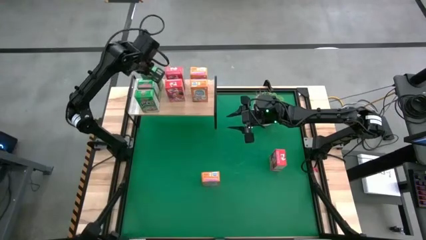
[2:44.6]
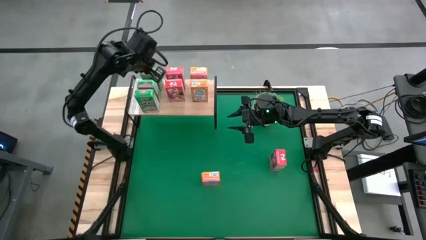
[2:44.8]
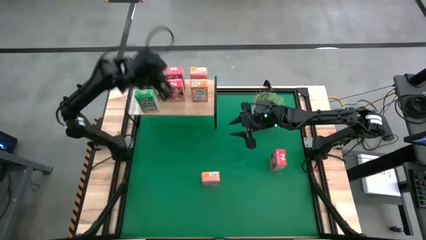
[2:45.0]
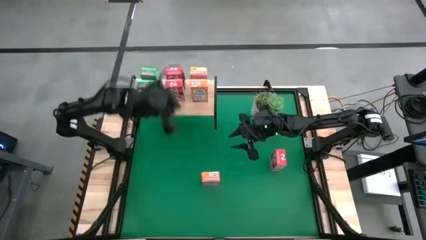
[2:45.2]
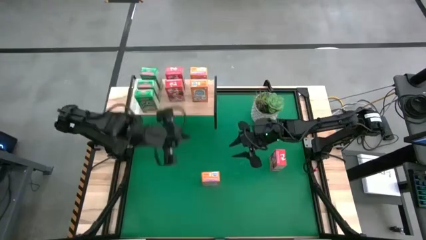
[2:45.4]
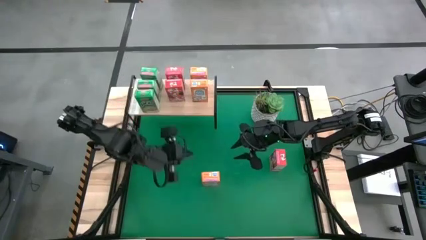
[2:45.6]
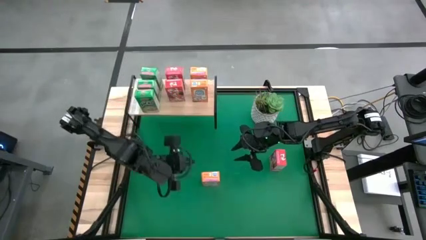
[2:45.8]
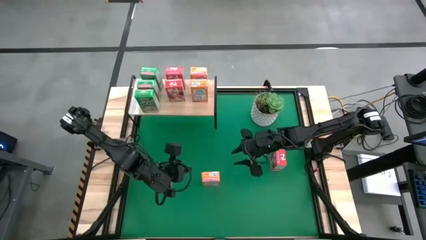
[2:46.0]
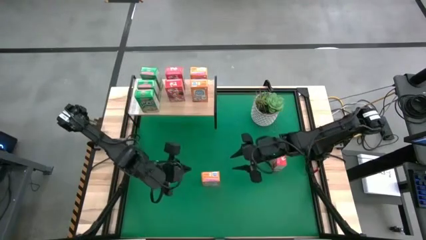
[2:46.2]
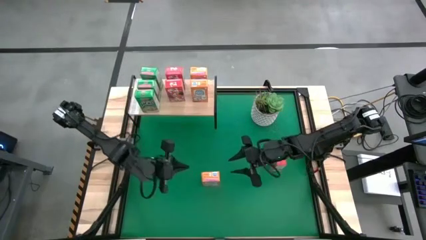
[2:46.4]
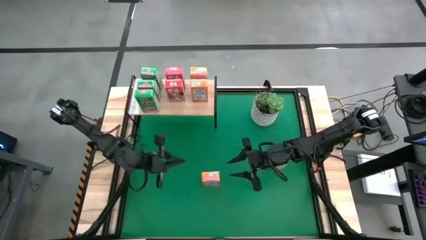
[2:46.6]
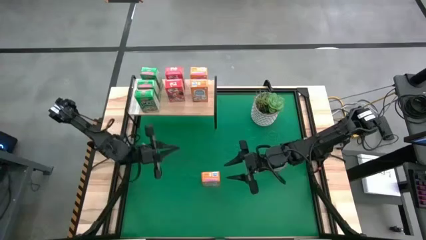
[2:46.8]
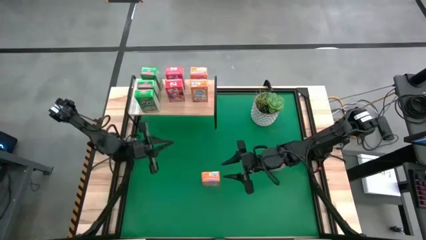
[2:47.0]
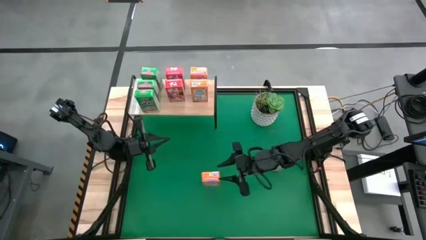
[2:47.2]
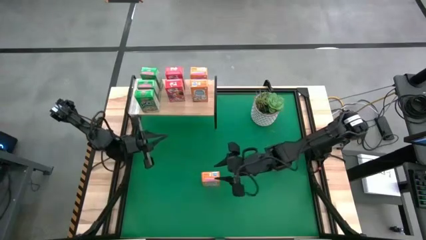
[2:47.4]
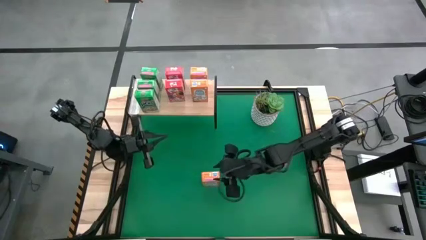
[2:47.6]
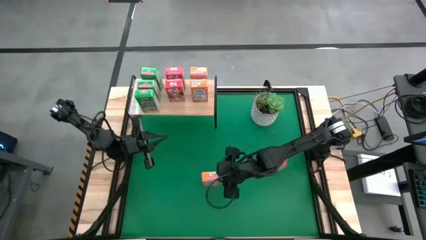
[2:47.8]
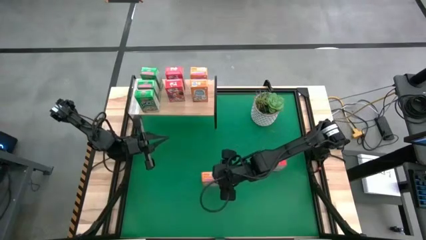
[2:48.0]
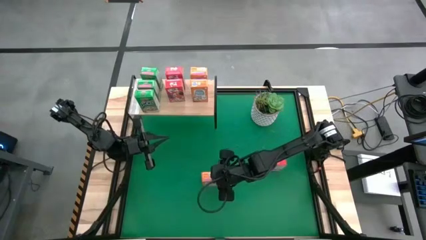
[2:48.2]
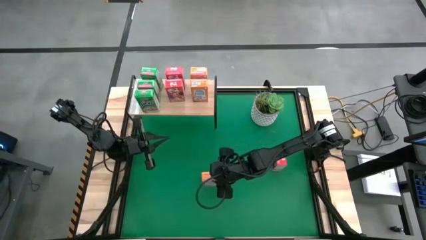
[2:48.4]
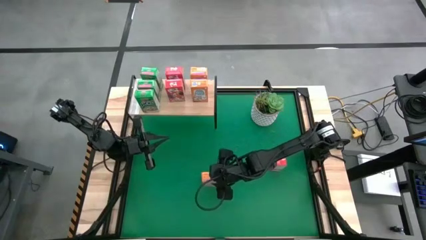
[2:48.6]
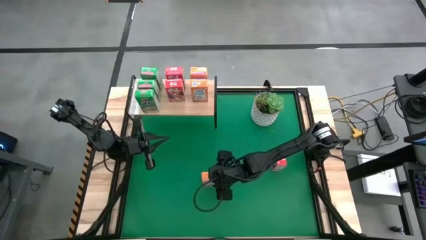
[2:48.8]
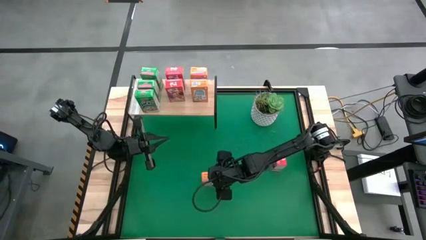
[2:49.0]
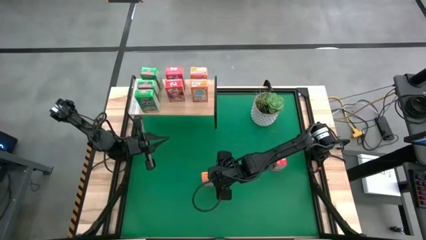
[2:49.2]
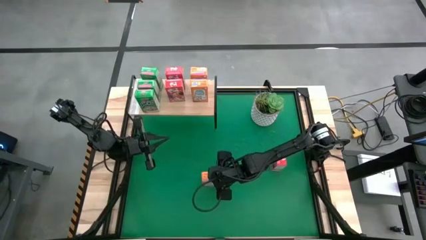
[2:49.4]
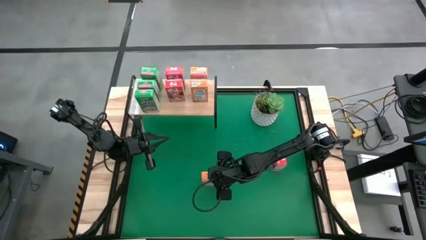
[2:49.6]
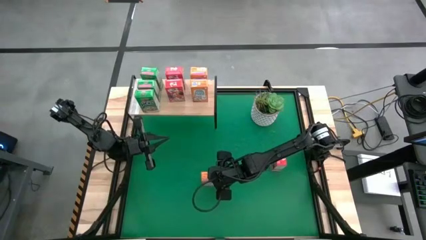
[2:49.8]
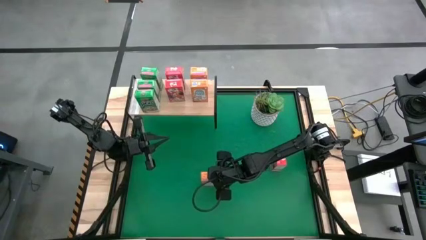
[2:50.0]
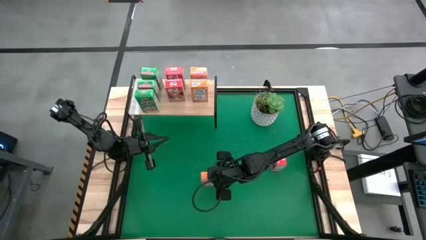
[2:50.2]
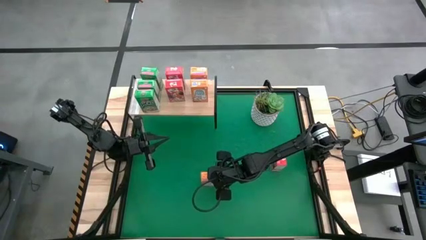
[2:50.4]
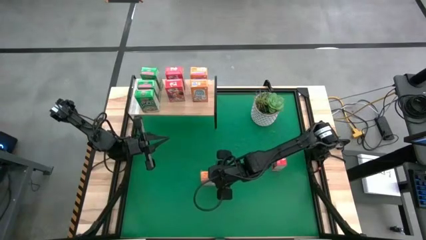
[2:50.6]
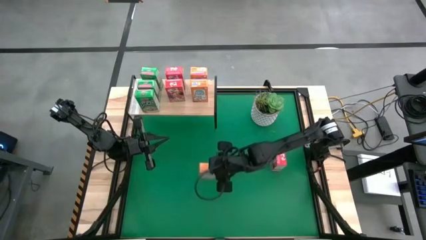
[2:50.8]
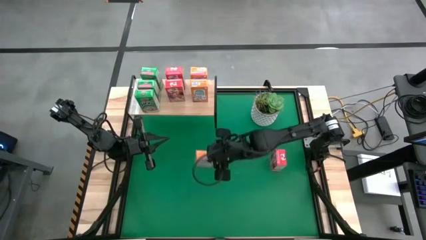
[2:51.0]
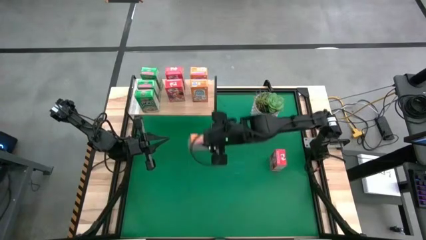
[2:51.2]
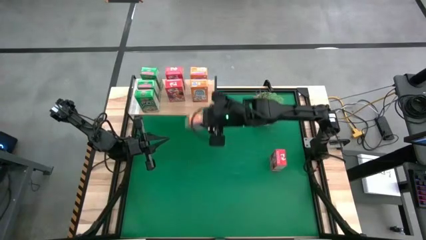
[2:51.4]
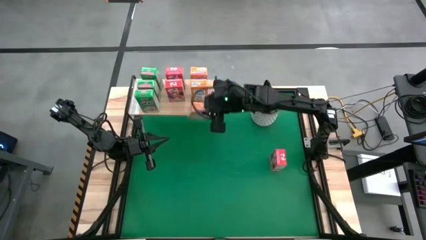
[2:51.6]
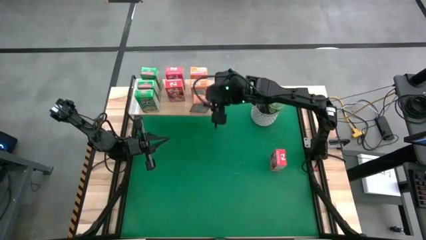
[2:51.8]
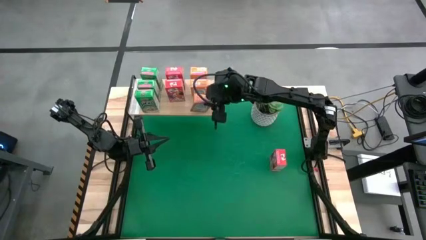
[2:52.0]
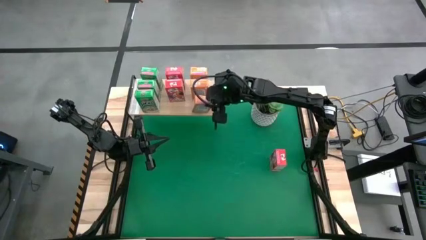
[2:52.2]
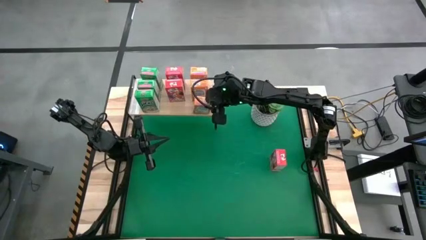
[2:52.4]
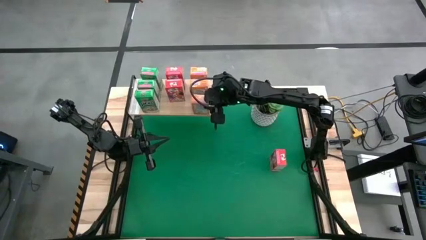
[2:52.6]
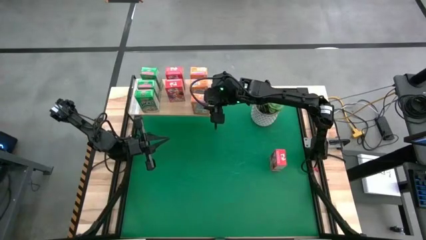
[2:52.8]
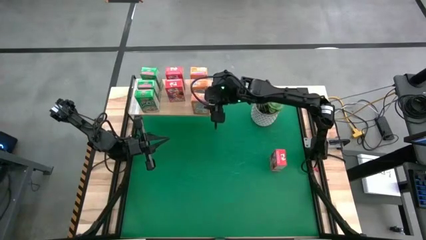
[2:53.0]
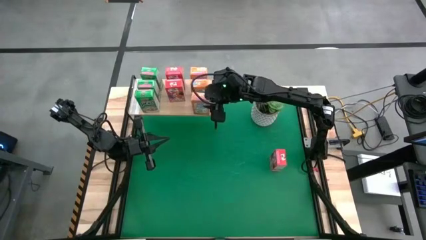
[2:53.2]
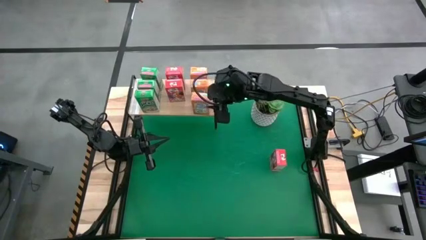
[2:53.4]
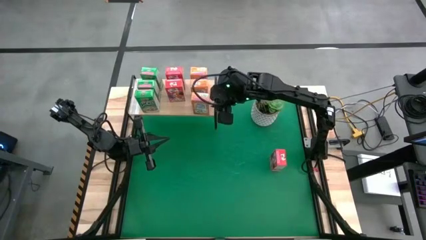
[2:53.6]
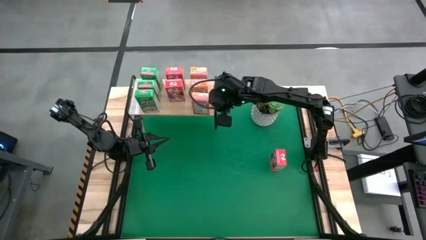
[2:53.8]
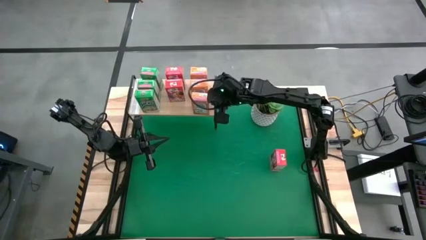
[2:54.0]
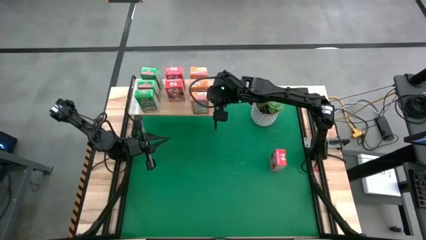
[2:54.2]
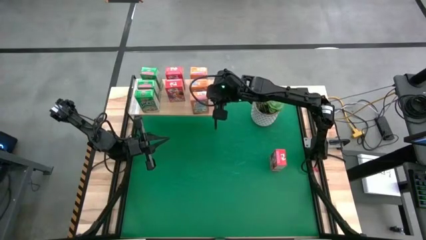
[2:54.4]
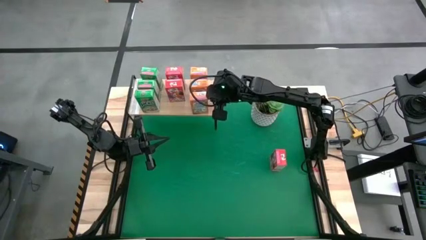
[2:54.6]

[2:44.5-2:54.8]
Task: Stack cereal on shelf
Put the orange cereal box on the shelf aligned with other orange cereal boxes

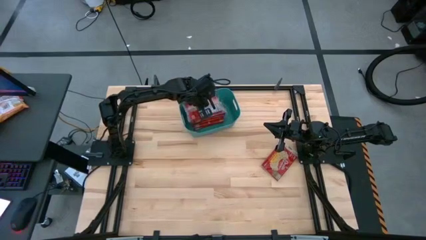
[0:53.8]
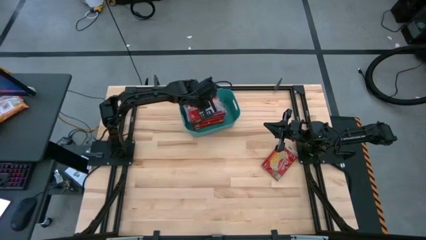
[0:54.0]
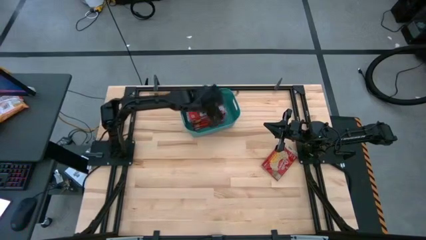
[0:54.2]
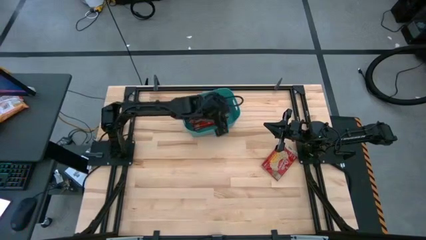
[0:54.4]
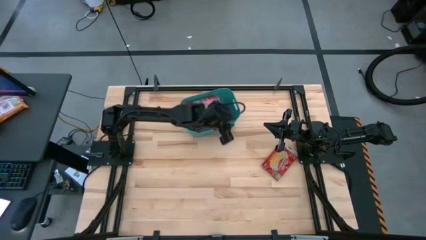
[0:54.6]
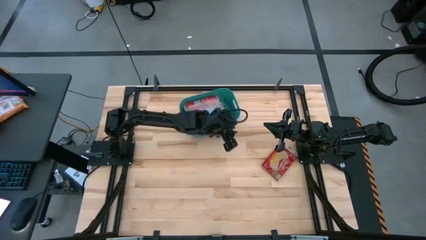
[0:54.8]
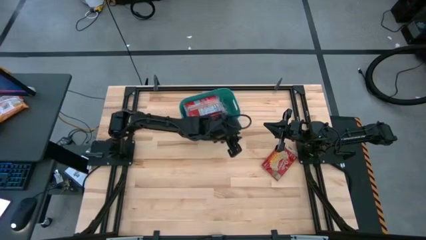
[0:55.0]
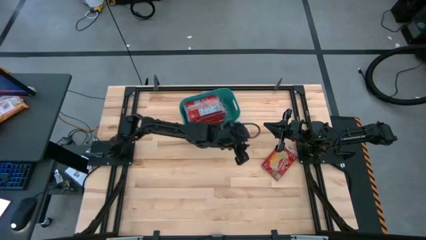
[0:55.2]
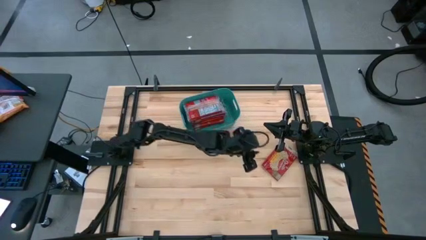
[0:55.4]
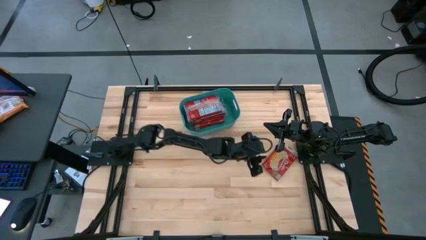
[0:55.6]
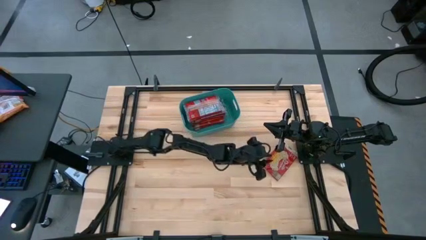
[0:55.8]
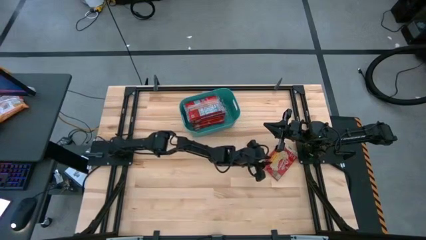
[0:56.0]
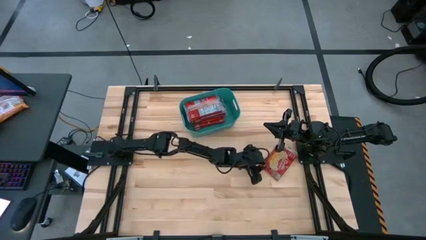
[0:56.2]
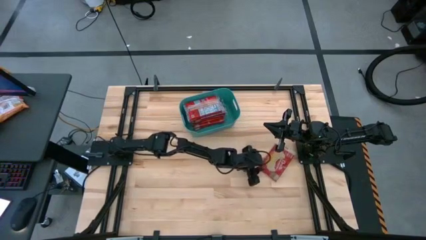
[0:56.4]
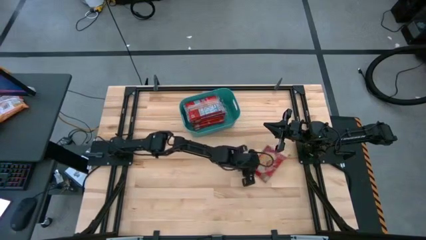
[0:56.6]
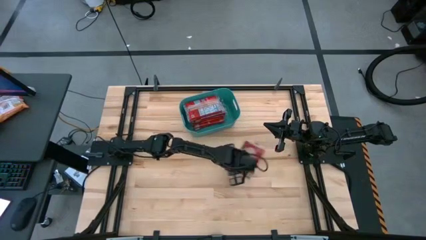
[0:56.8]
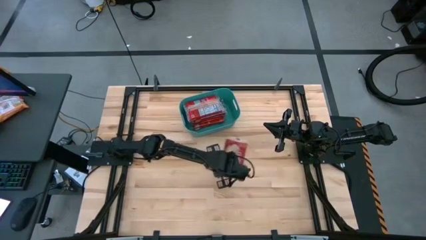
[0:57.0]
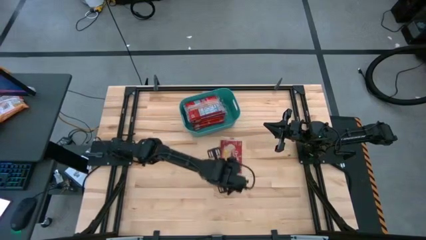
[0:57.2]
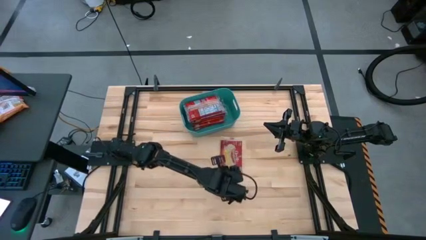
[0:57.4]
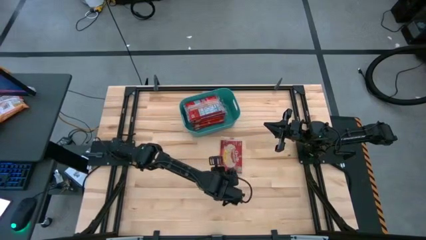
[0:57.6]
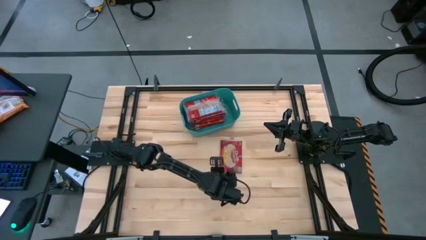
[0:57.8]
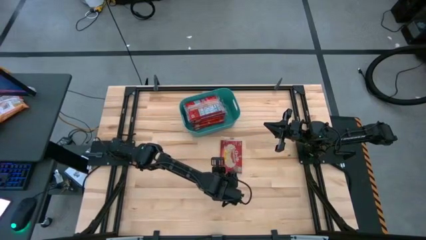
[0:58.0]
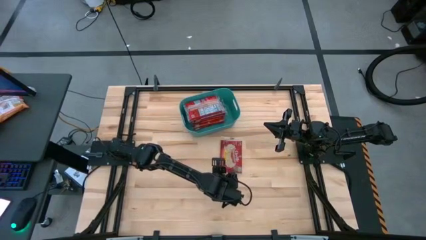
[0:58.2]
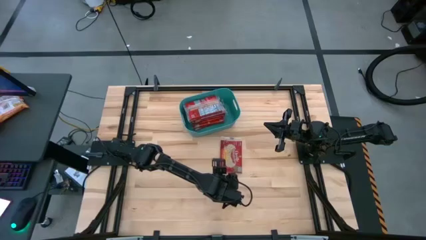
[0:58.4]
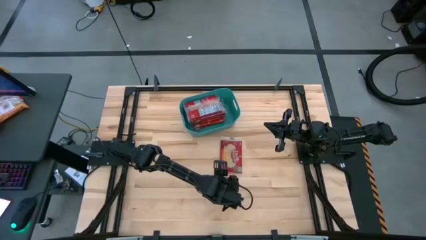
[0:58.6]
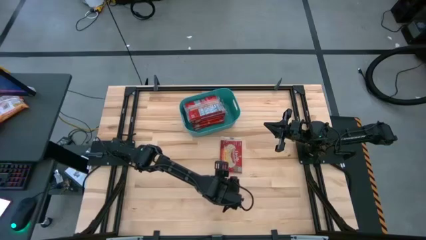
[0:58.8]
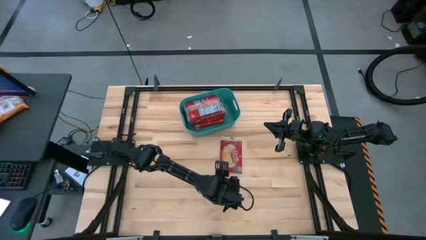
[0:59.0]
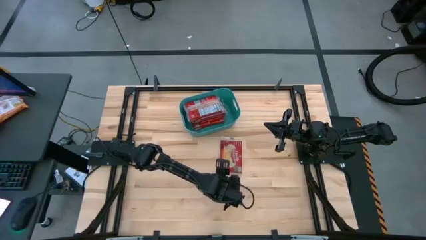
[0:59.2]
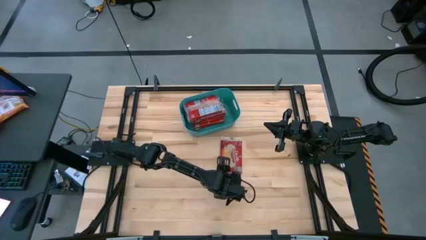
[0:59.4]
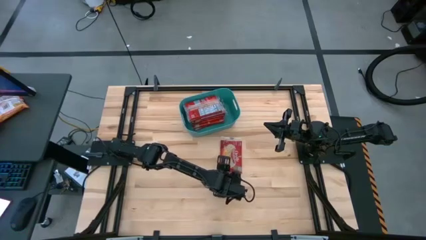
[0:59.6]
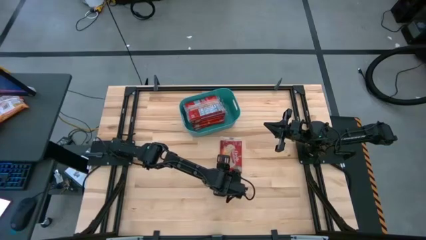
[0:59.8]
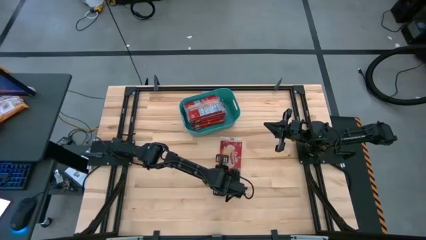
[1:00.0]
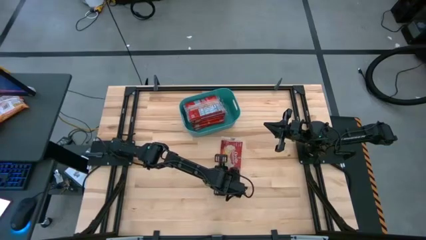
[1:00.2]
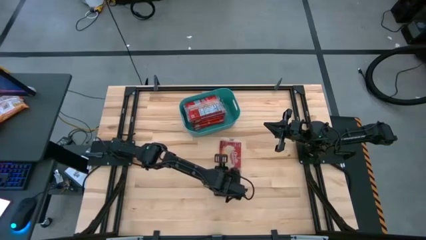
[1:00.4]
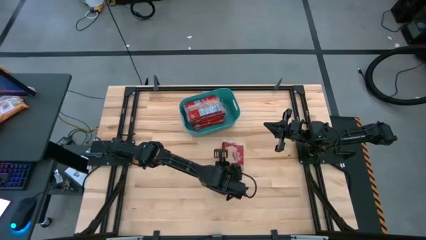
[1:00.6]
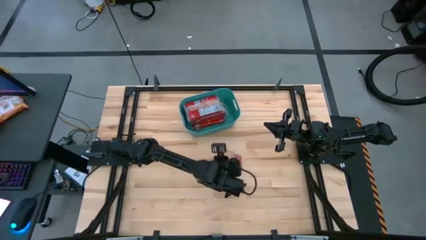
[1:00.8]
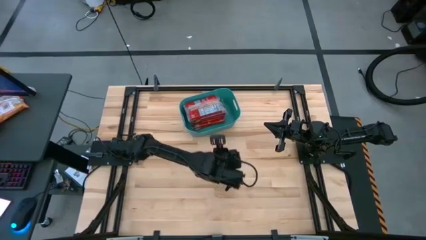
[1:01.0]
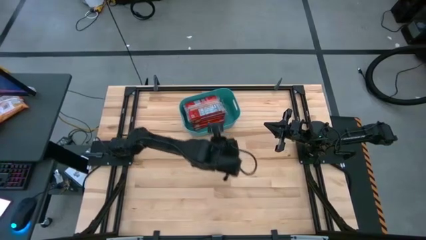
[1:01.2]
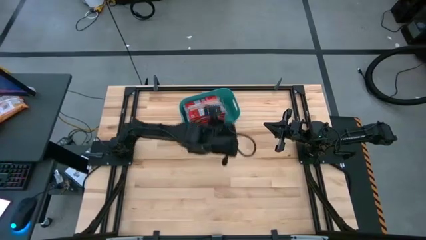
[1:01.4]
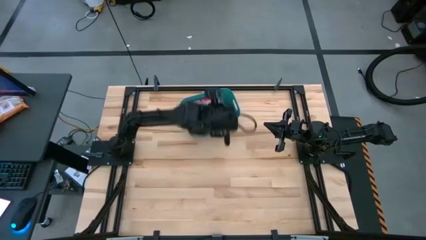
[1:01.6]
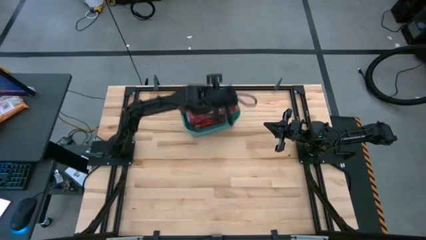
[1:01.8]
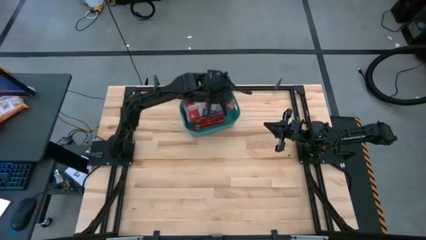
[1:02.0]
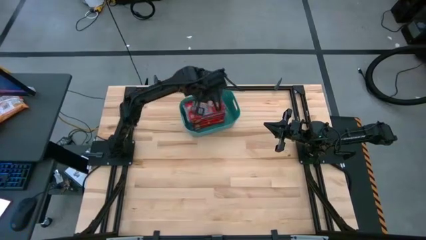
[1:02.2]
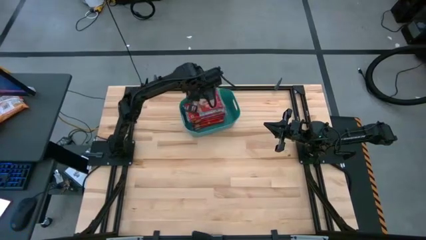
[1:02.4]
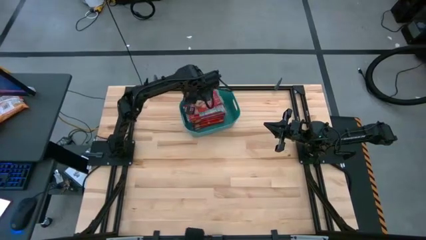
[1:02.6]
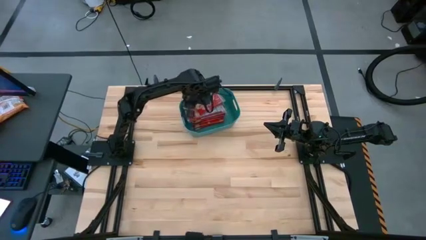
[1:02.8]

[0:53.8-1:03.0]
Task: Sort popcorn bags into baskets
Put the red popcorn bag into the green bin
